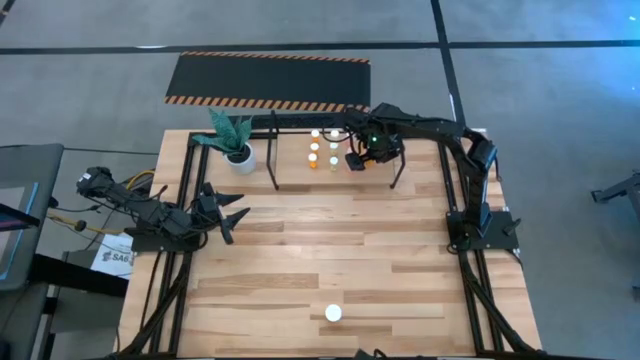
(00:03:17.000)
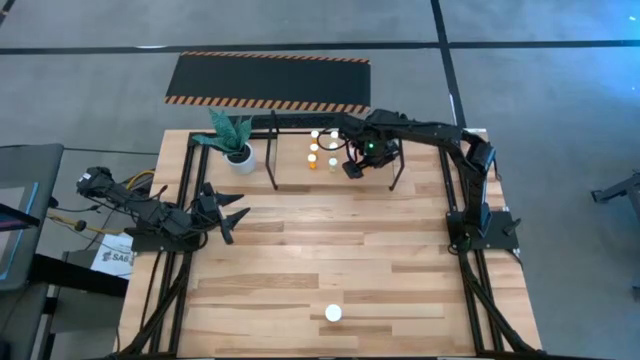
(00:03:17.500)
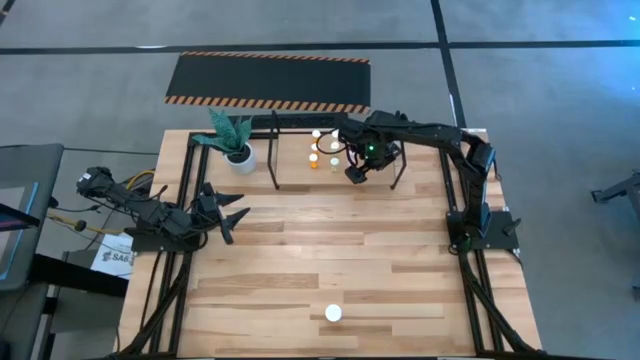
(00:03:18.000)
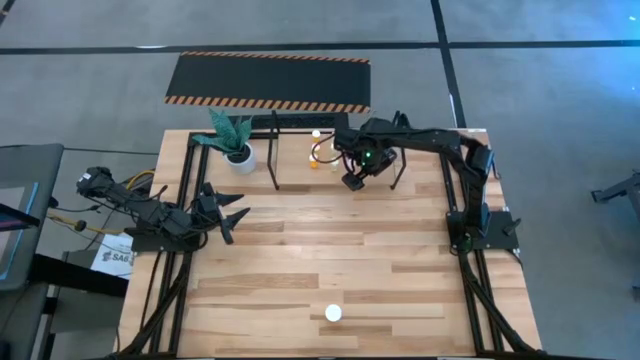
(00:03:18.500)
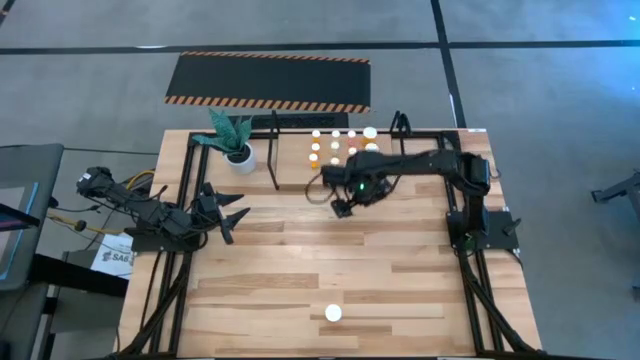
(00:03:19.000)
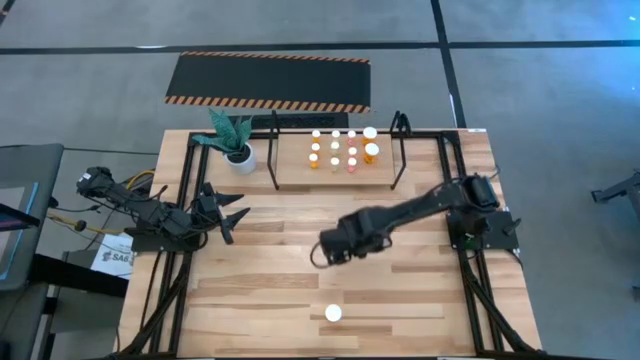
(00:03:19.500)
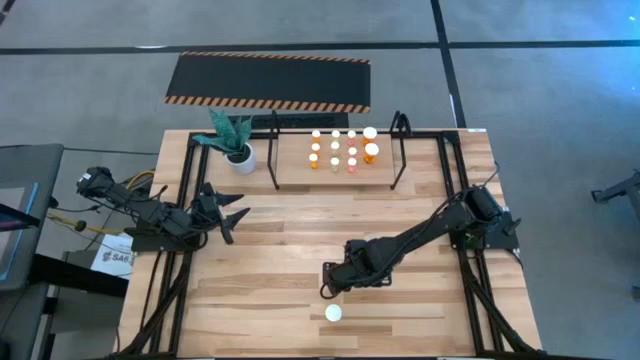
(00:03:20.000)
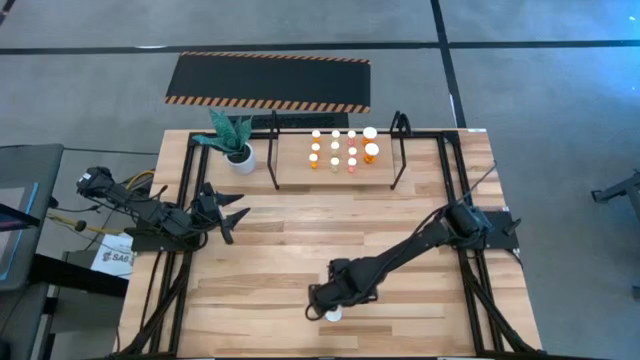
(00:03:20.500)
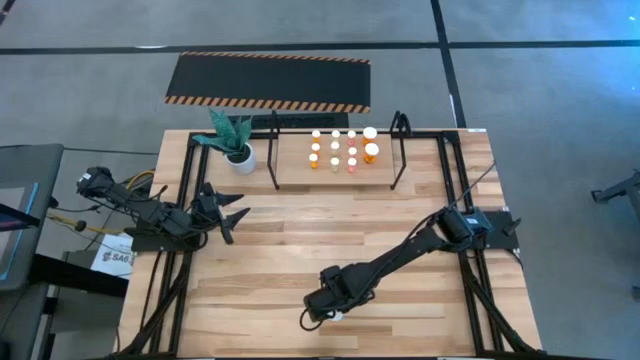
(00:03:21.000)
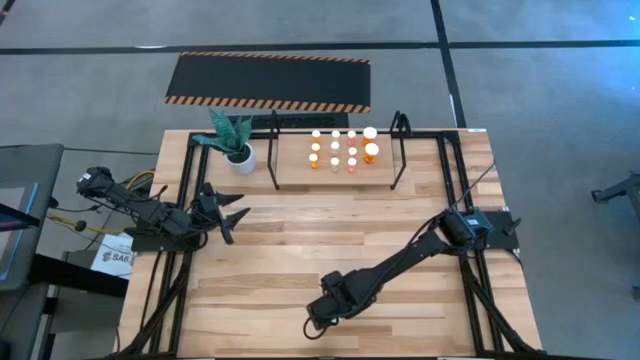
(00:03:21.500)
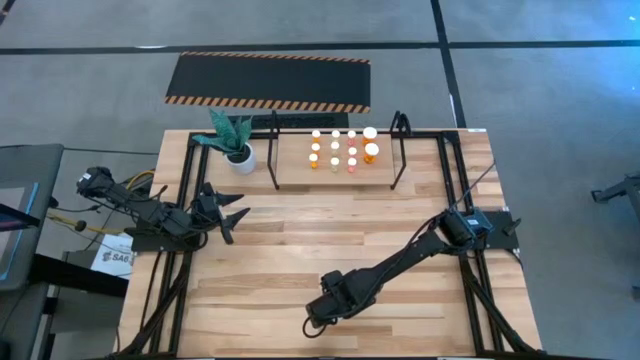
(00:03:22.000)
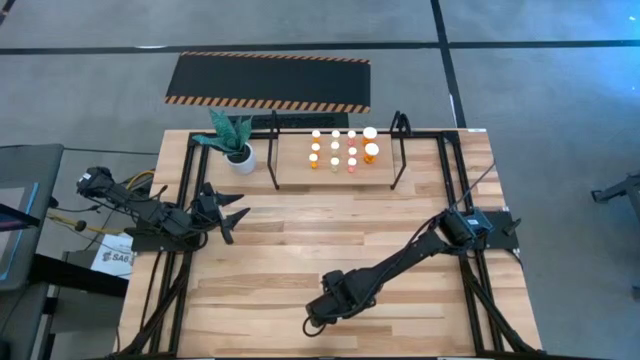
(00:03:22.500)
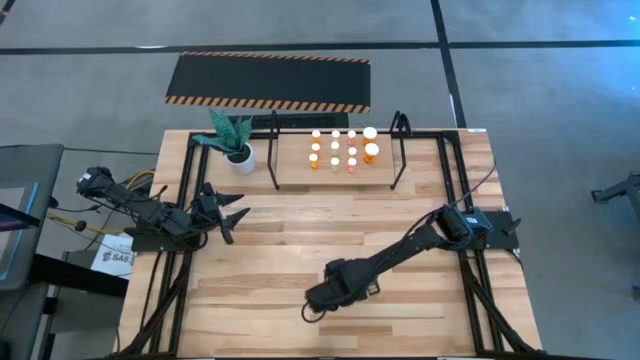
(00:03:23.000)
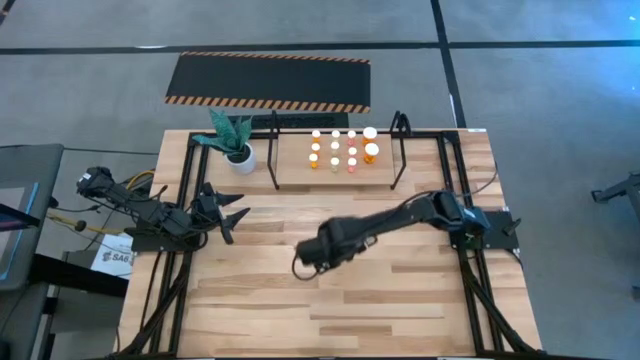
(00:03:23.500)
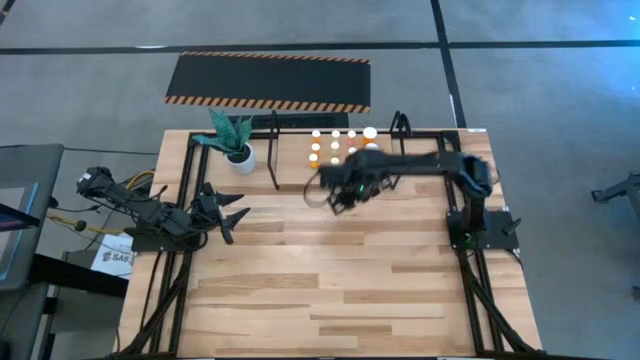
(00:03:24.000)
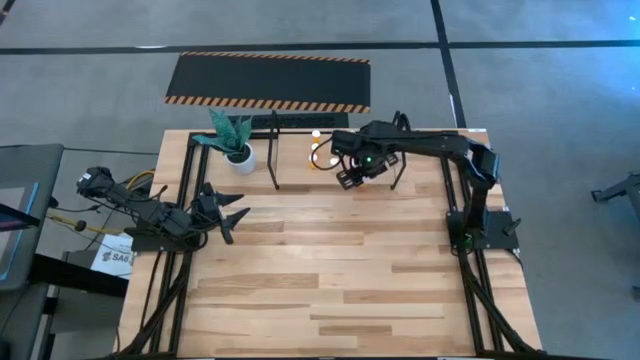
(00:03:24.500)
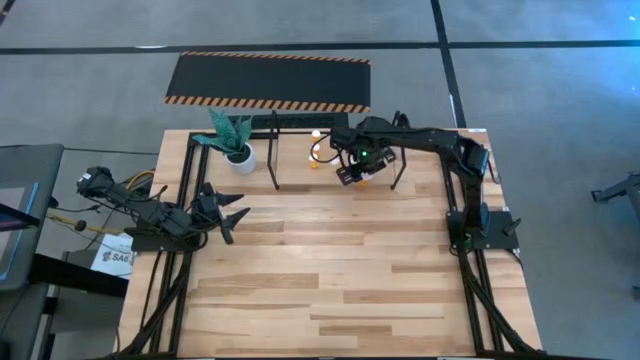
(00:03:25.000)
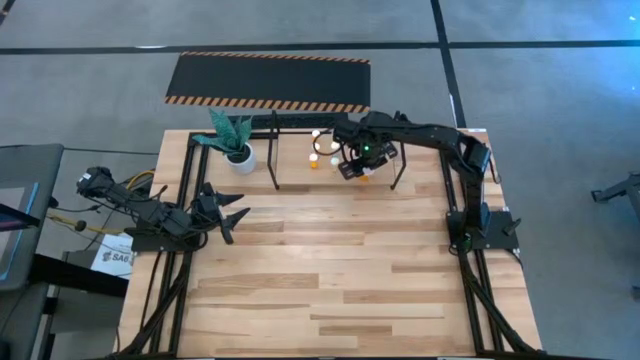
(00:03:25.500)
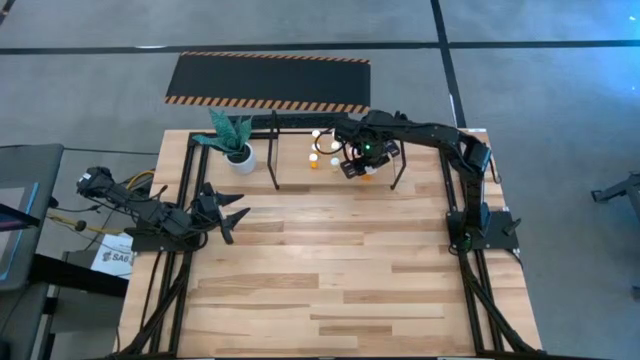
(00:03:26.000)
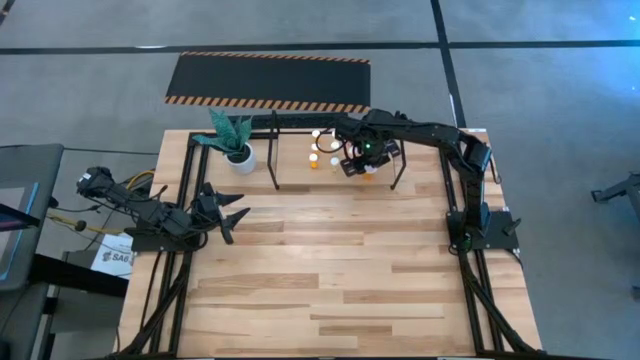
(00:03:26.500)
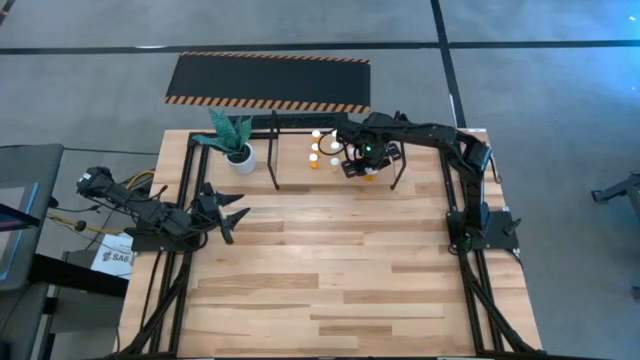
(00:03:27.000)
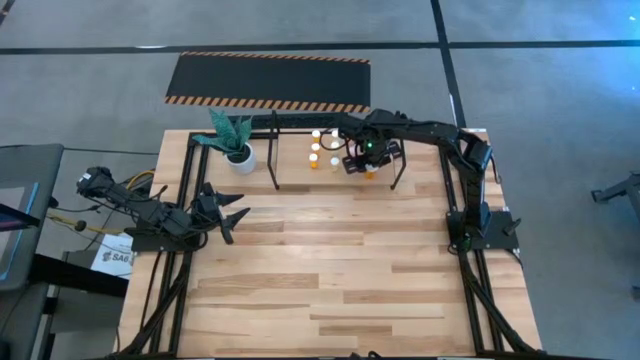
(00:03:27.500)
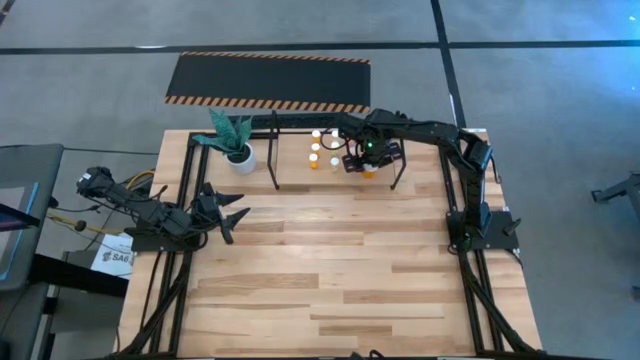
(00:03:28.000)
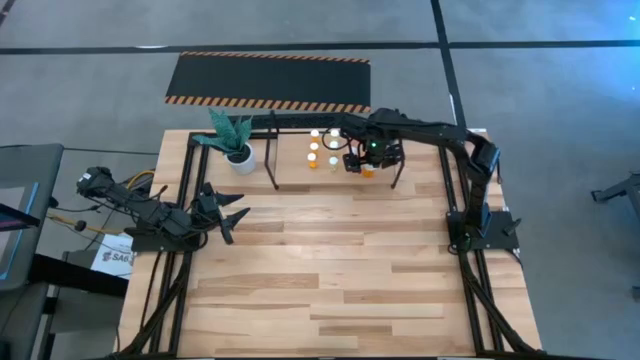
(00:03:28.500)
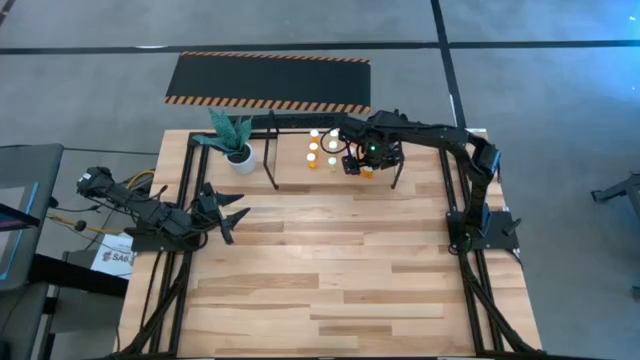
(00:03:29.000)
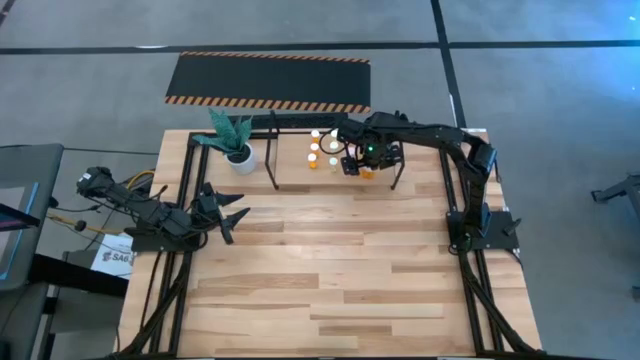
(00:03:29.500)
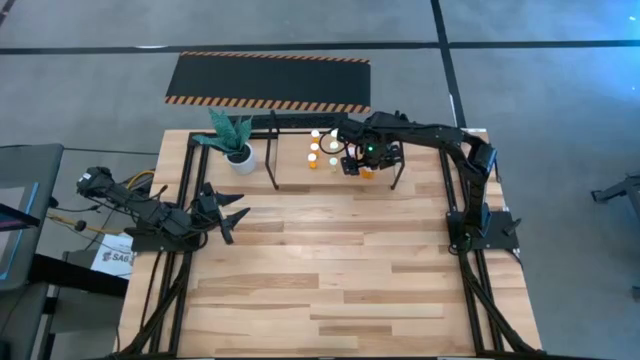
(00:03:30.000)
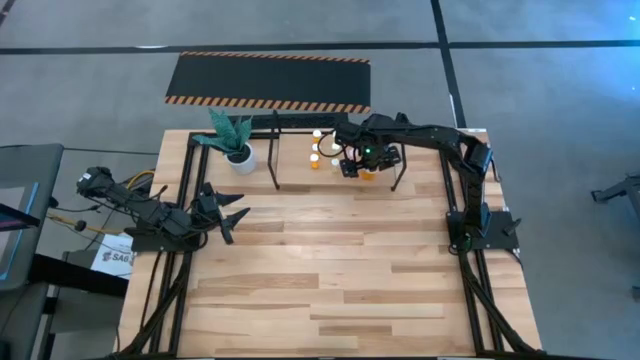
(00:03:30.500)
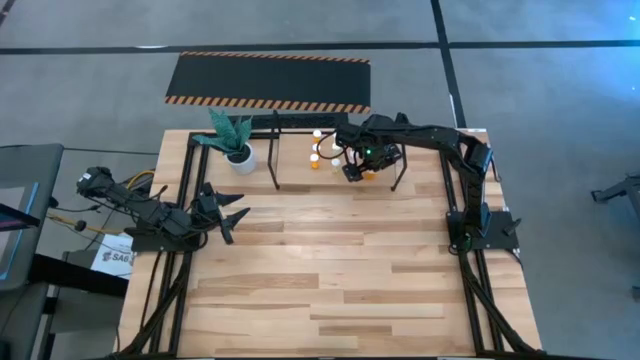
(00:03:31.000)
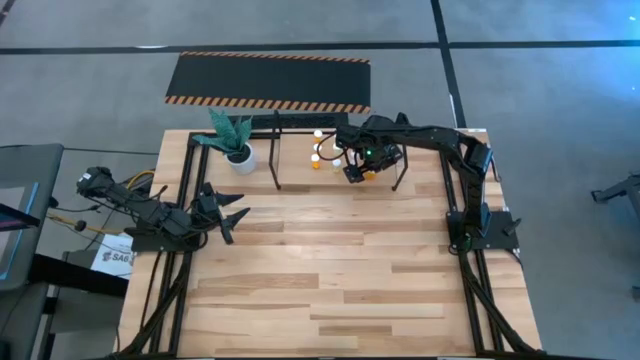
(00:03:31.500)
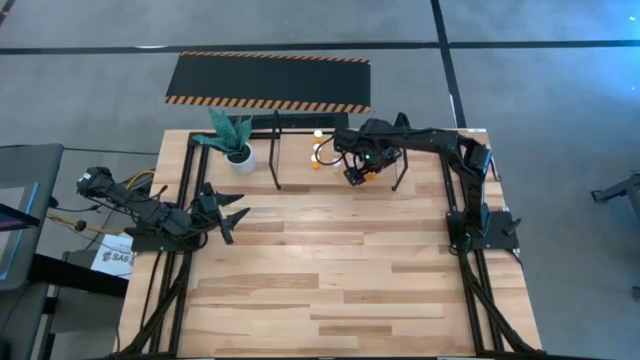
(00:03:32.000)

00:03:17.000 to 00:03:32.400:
Task: Pick and place medicine bottles onto shelf by color
Put the big orange pill bottle aligned with the other big orange pill bottles on the shelf

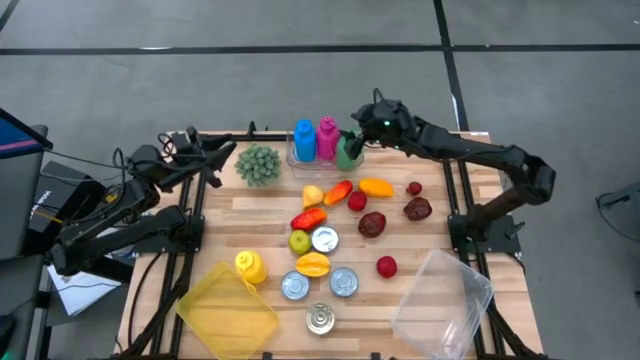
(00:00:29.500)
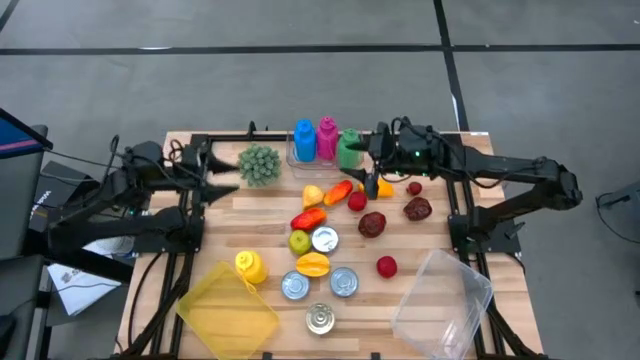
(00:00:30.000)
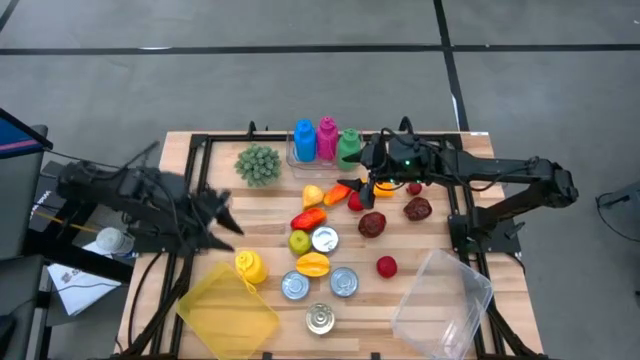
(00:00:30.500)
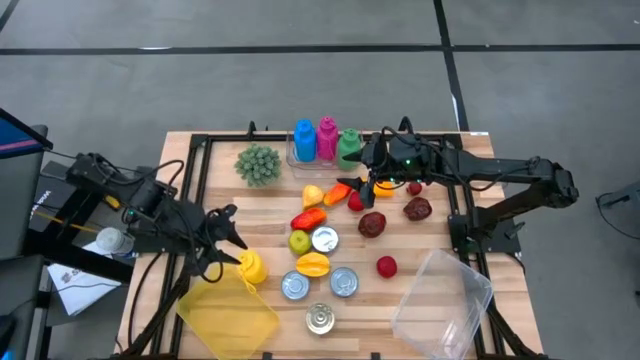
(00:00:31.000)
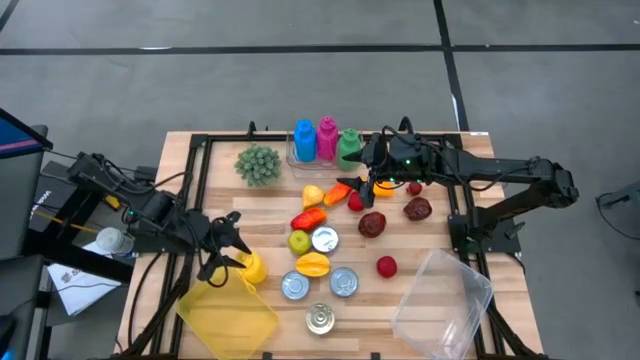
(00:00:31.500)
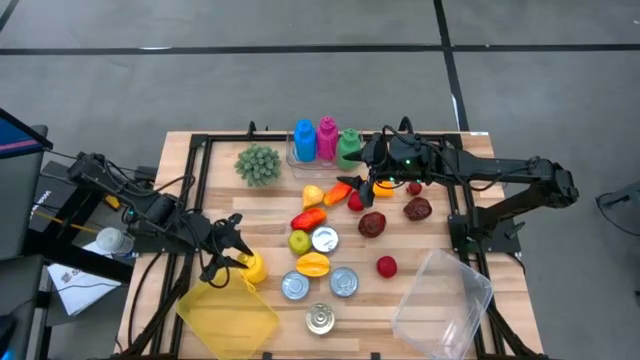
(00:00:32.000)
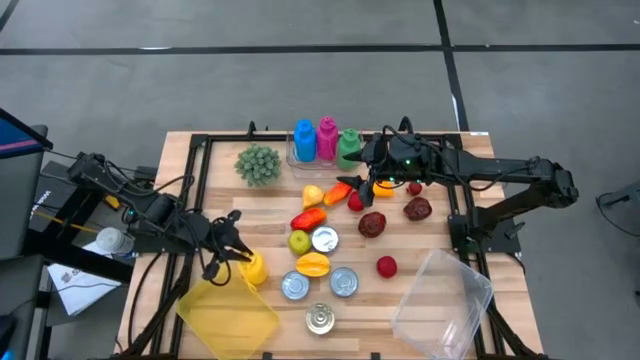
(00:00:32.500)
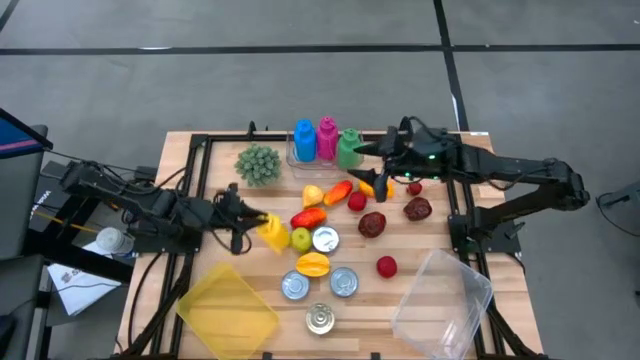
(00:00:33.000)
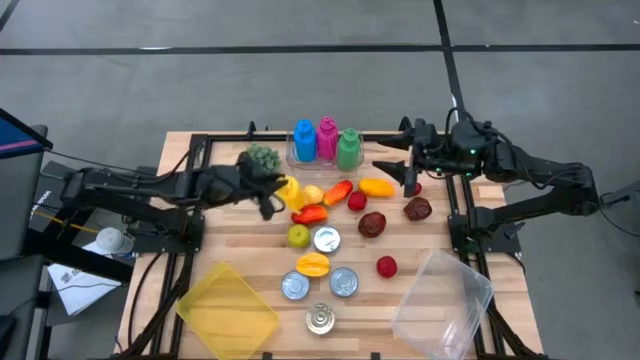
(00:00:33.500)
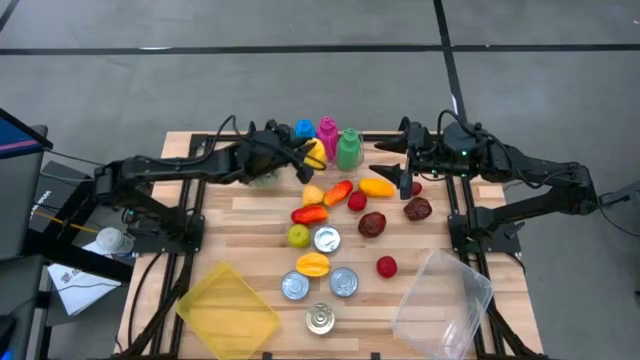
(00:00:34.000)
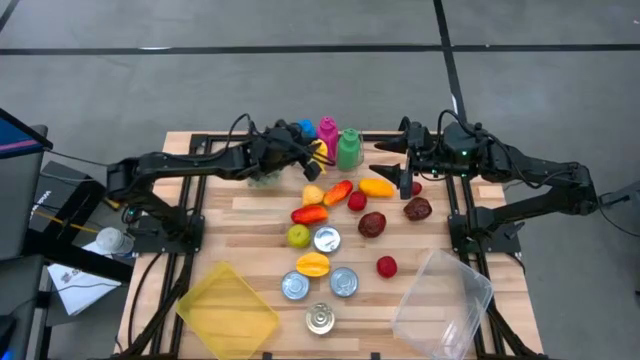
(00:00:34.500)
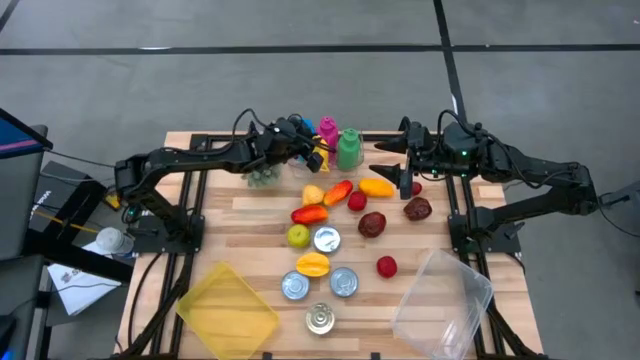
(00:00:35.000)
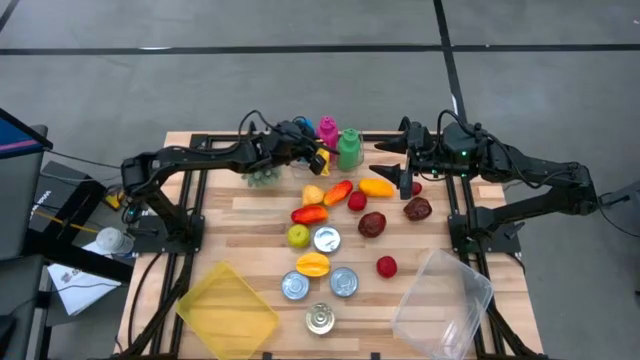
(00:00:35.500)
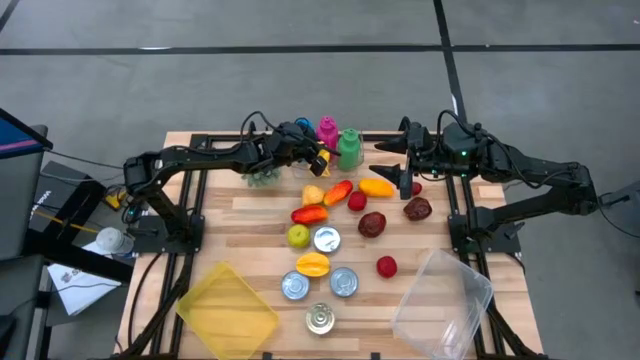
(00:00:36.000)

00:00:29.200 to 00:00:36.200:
Task: Pick & Place Food Item
Put the yellow water bottle into the transparent bin
